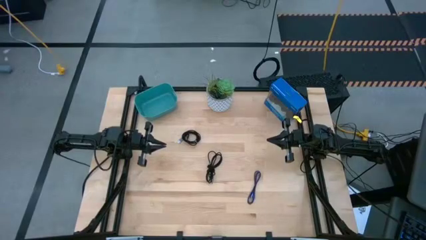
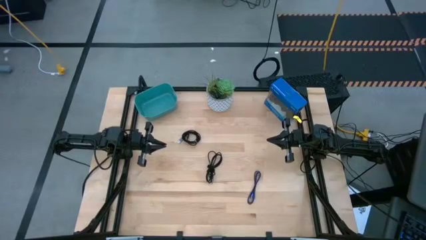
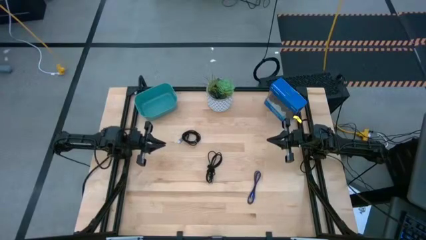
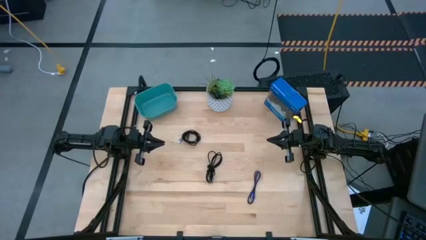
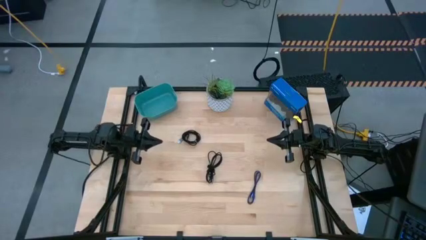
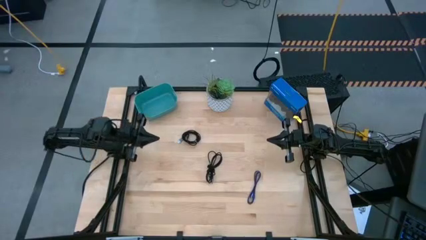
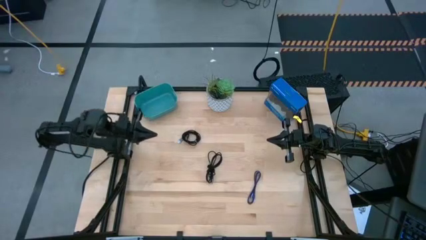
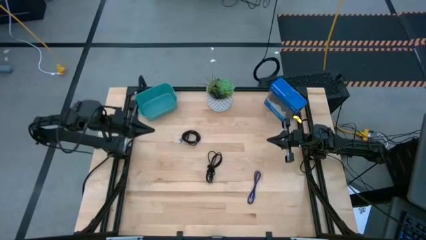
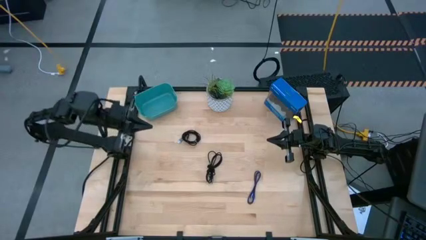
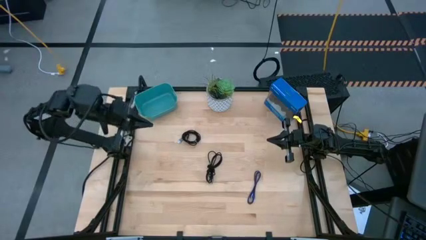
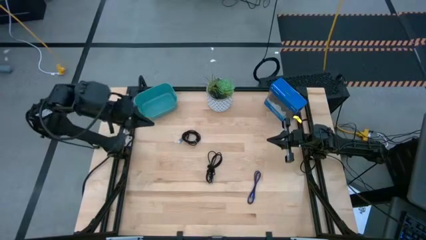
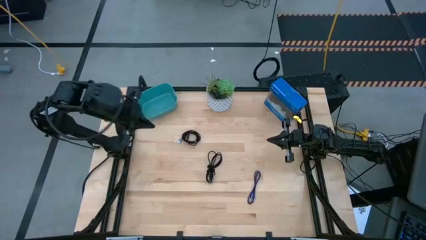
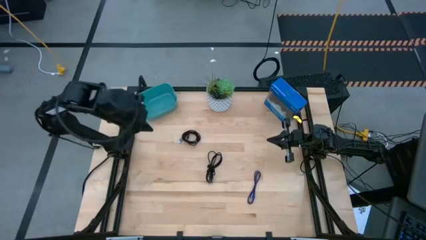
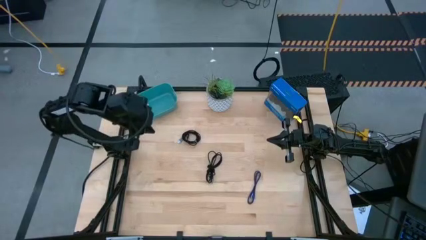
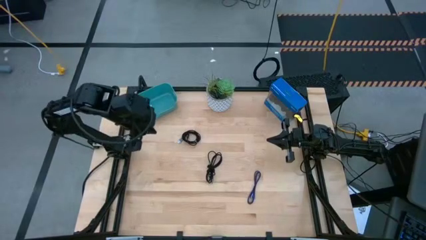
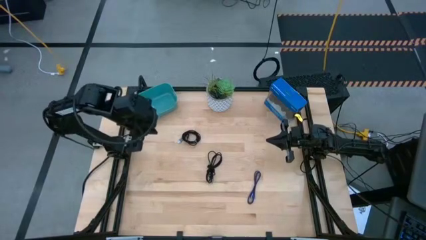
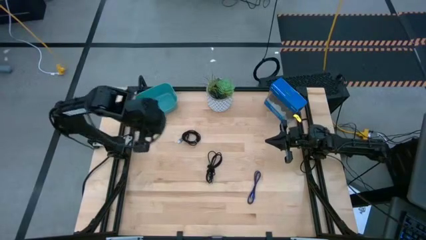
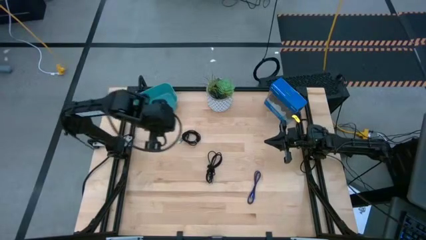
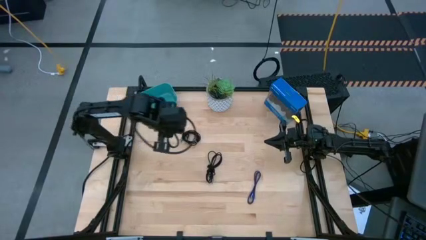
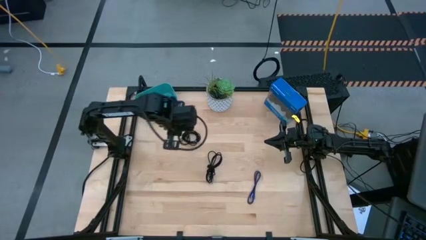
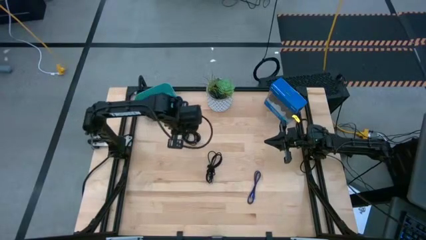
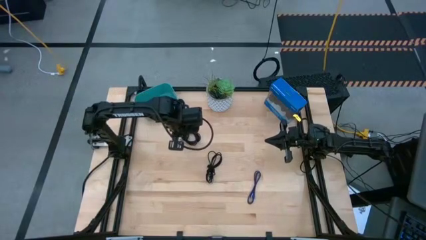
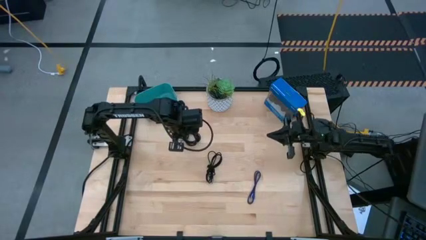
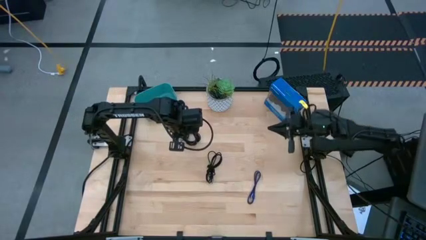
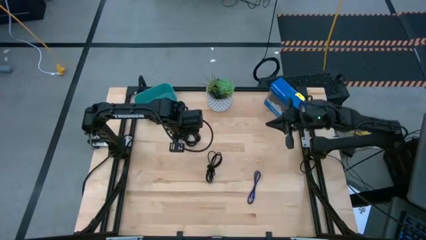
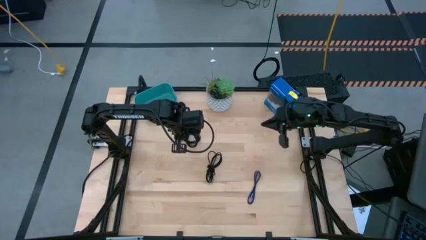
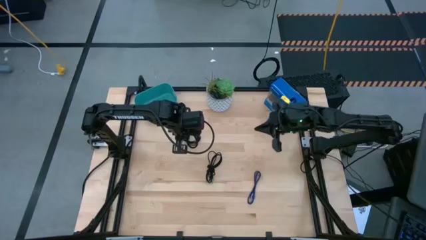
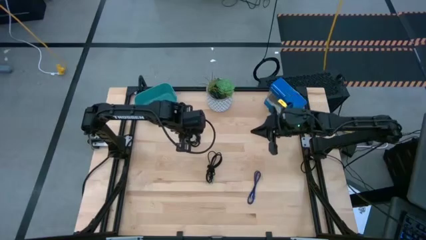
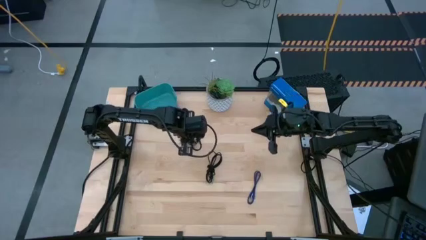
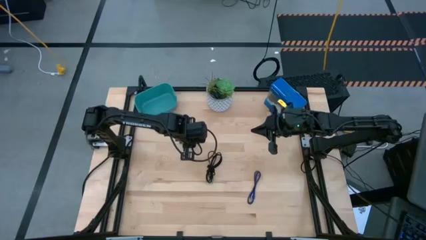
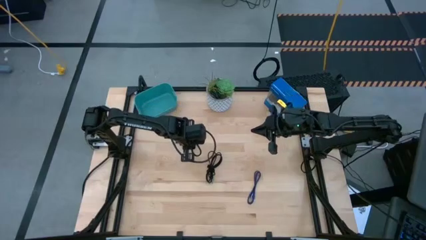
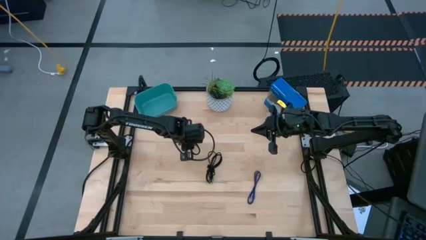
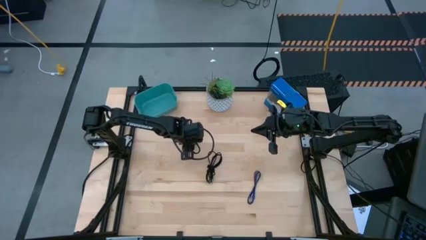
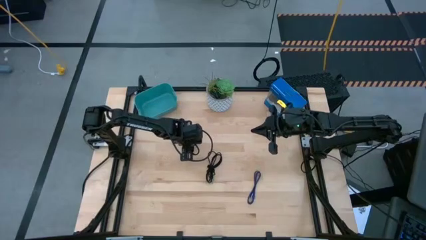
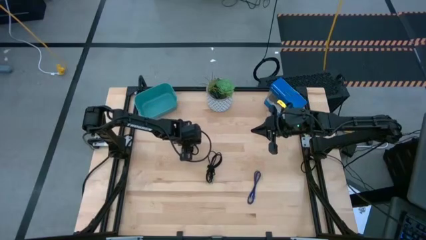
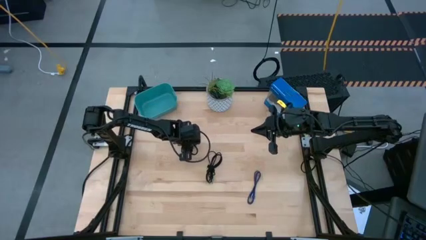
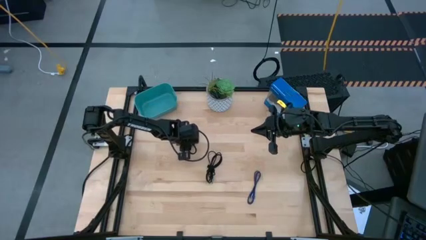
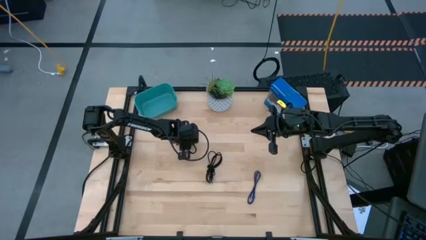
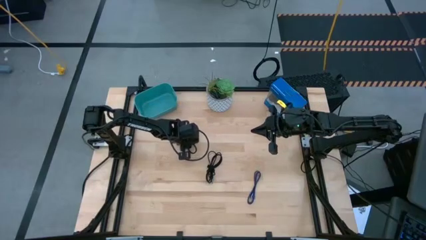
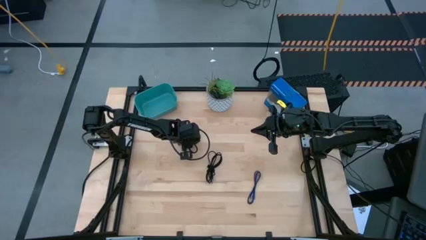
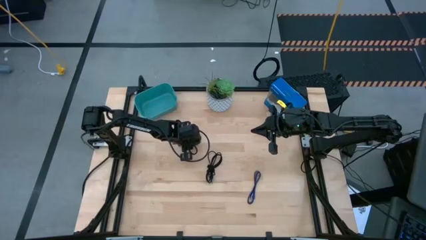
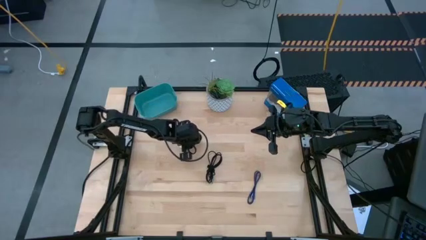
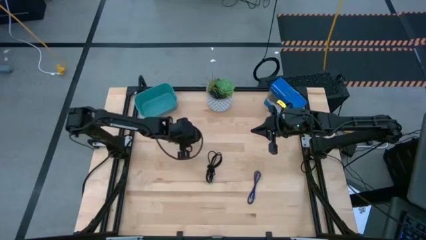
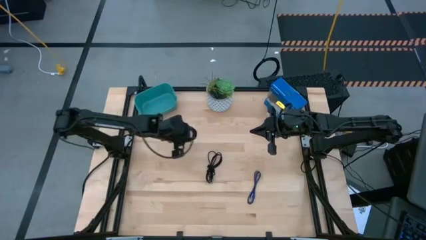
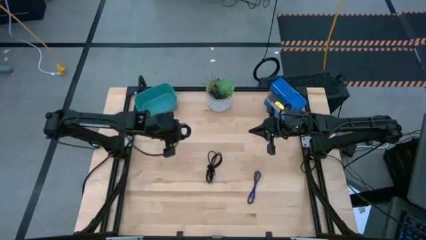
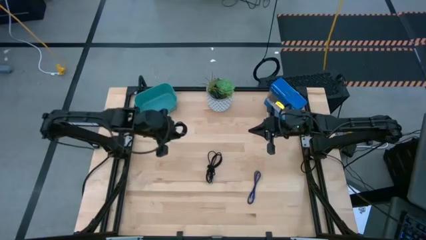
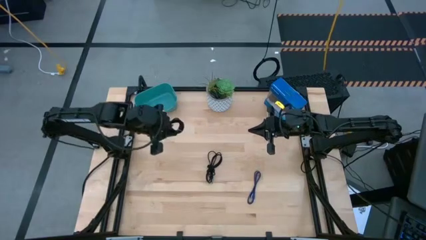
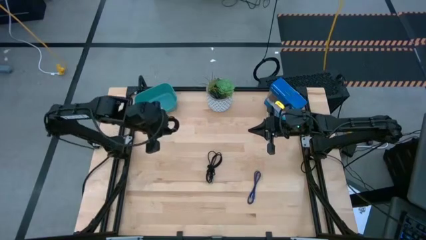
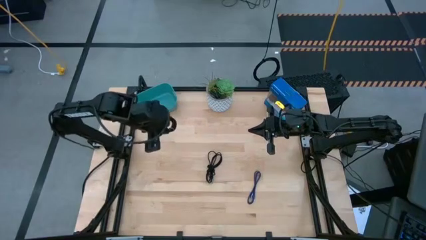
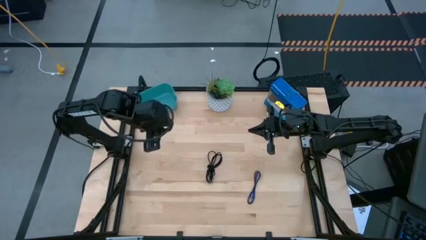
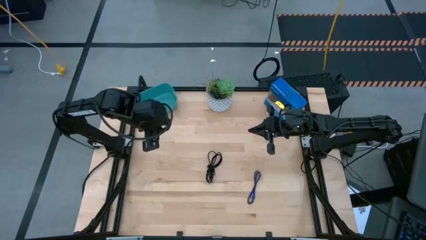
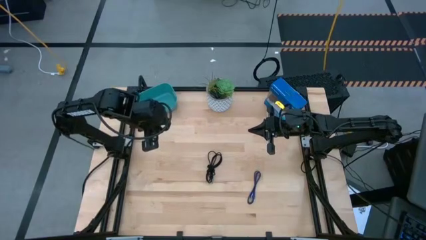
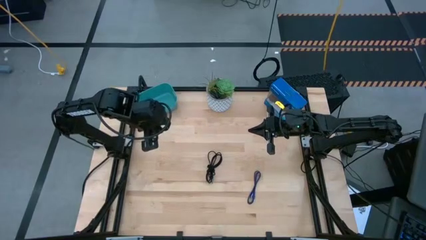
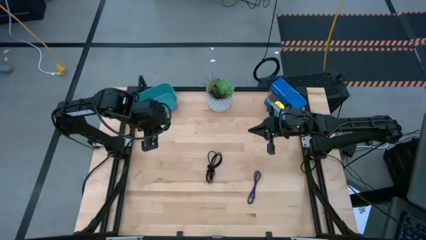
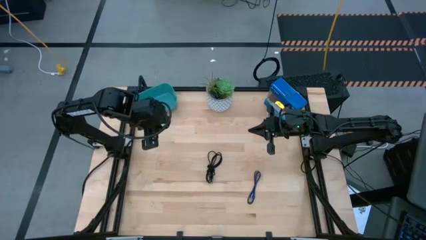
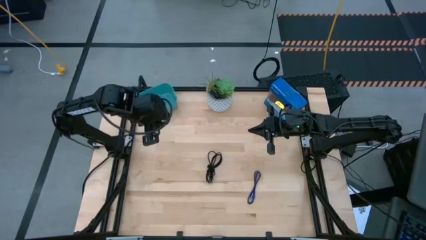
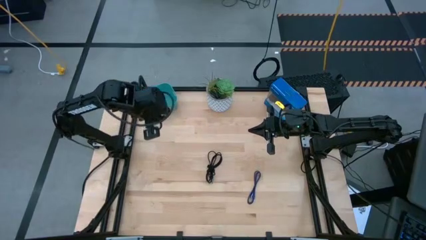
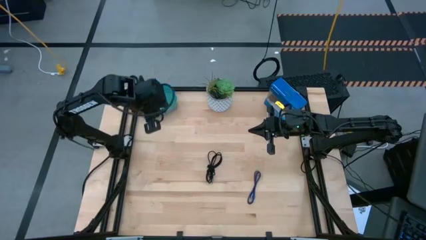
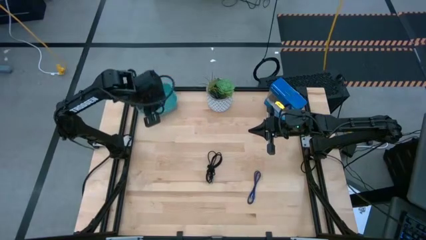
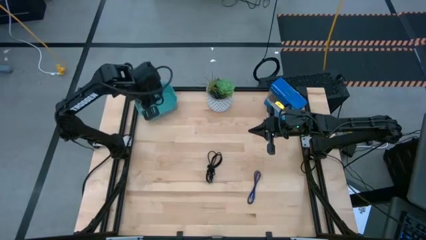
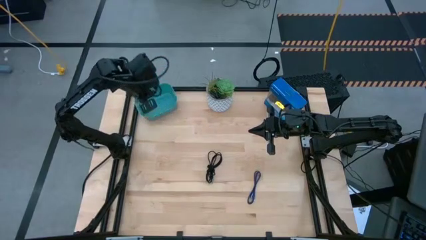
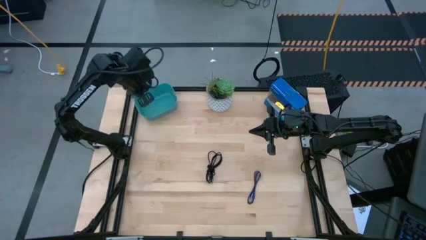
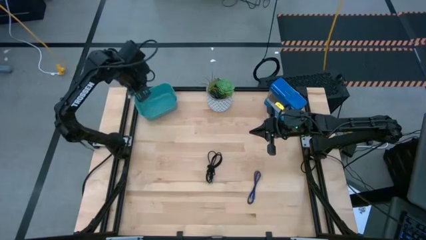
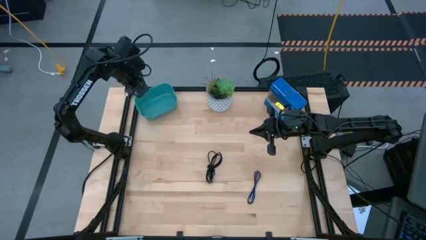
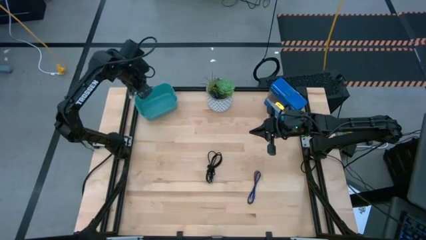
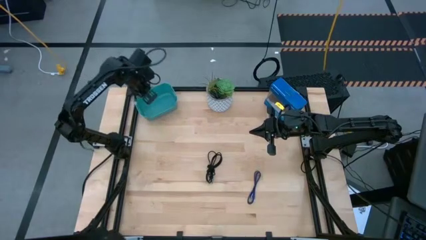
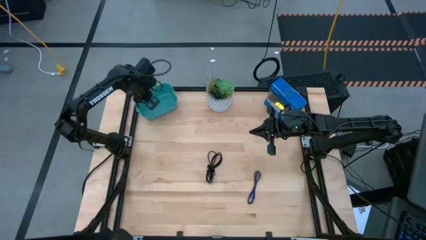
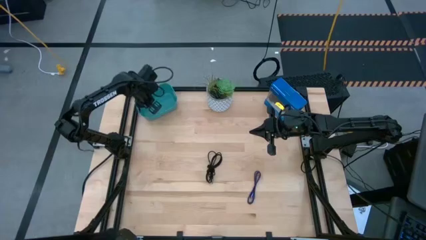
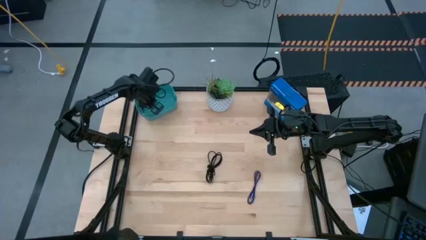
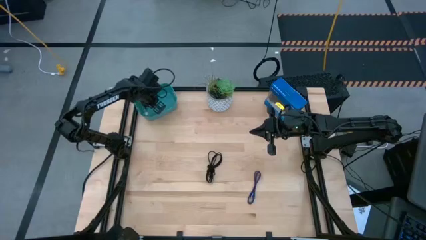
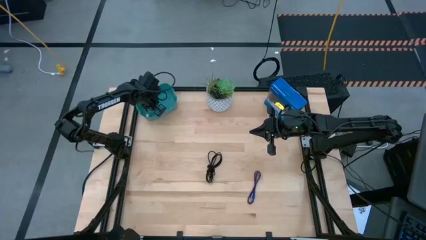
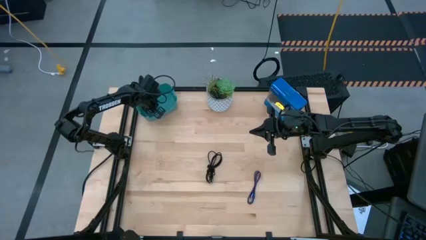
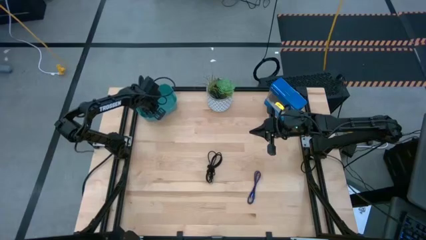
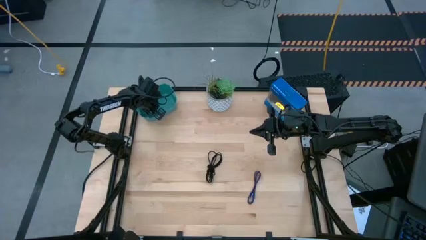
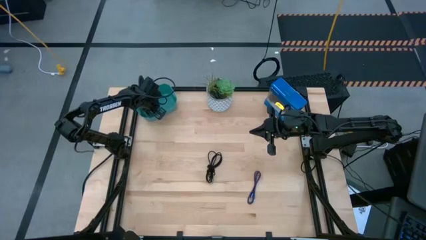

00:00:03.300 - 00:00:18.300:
Task: Pick and place USB-C Cables
Put the black USB cable into the blue bin
